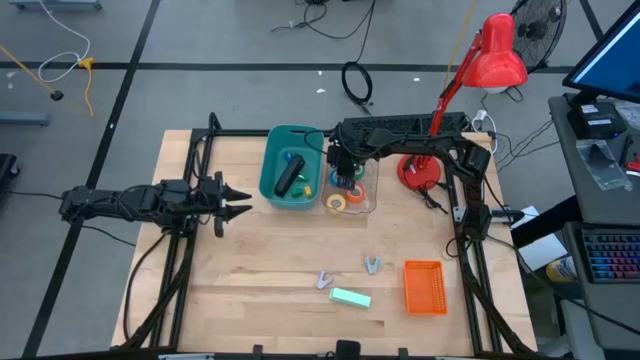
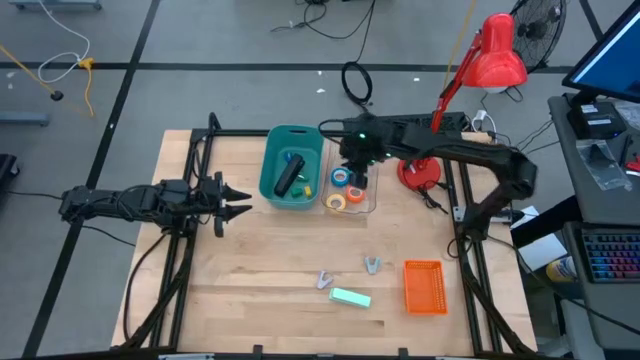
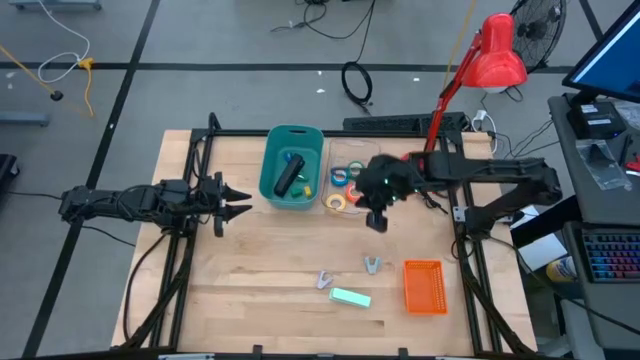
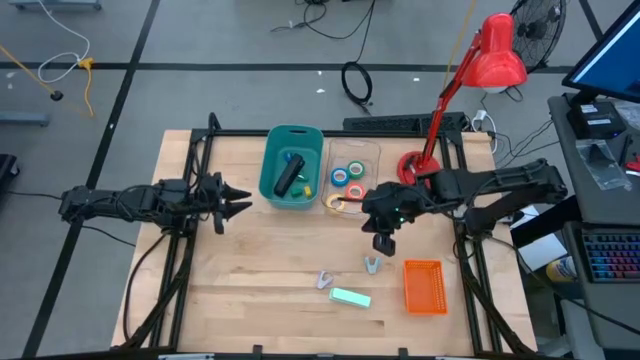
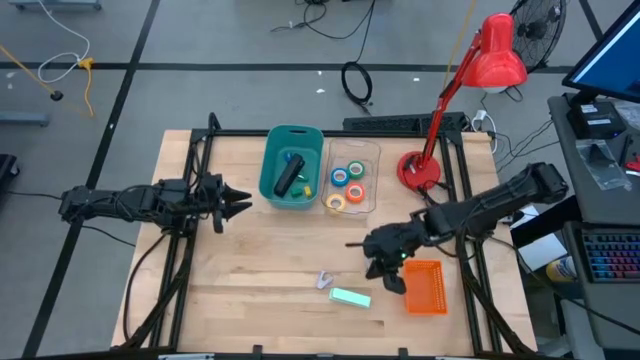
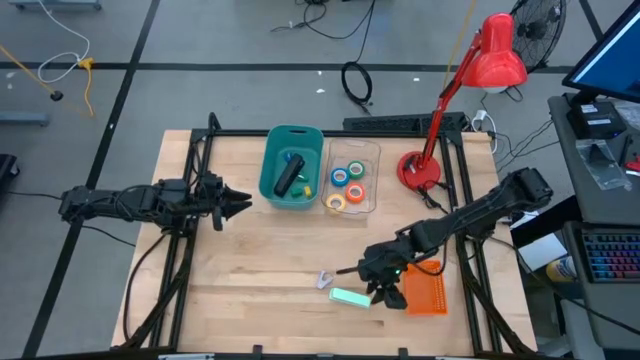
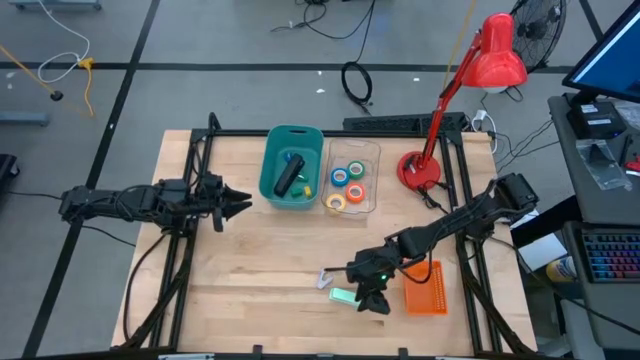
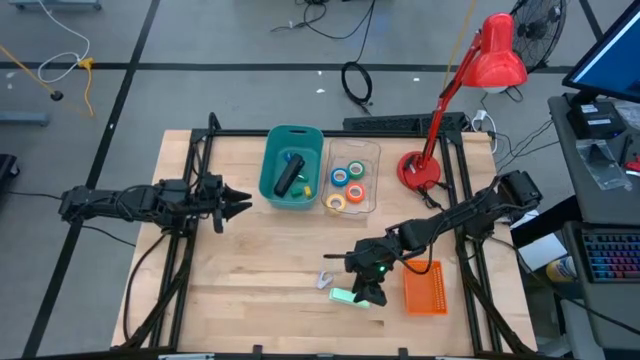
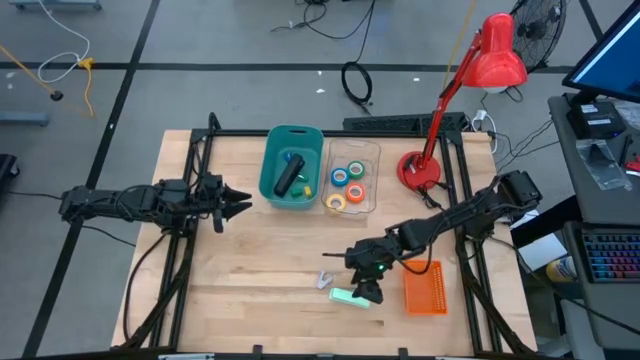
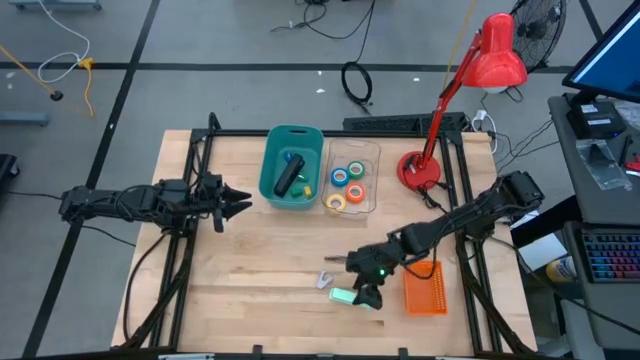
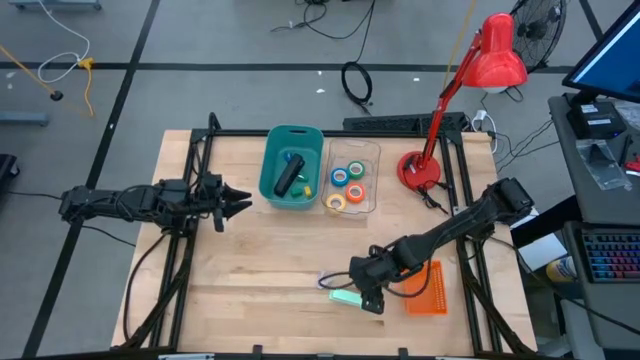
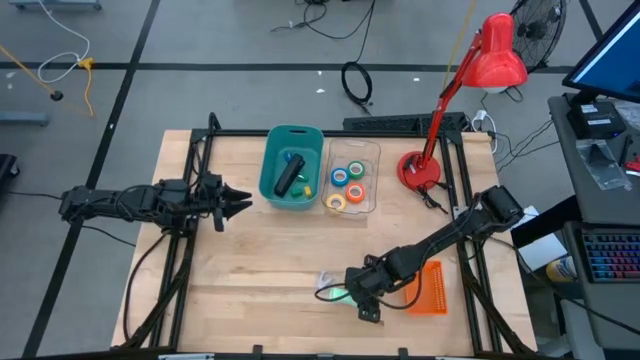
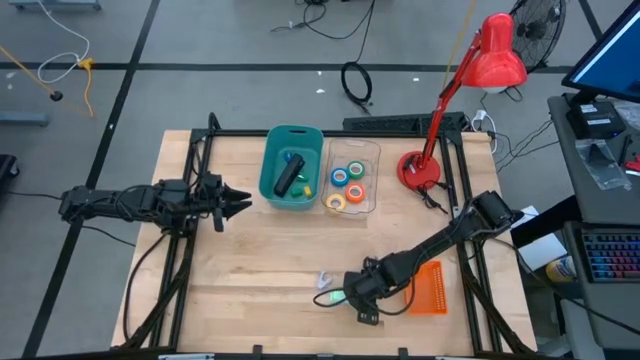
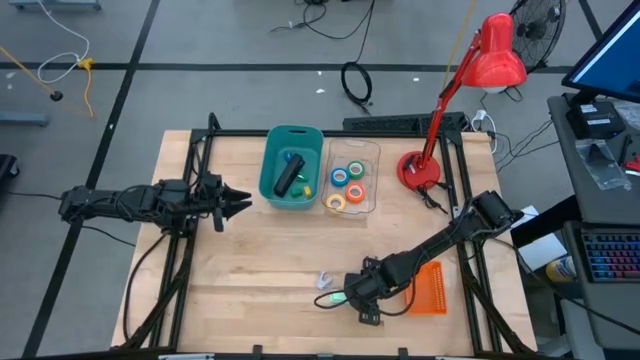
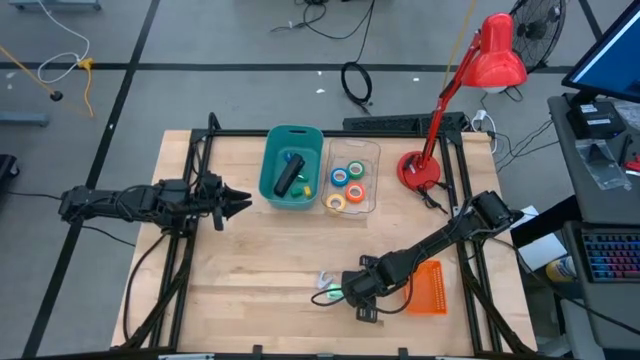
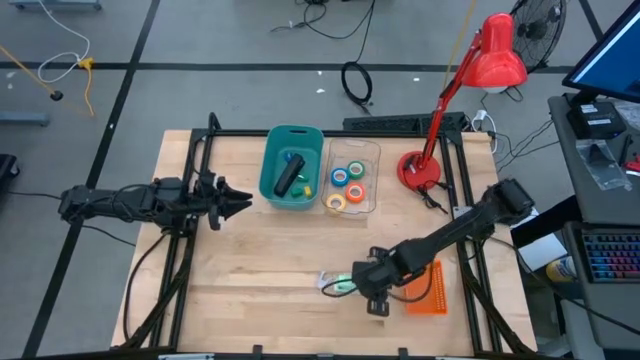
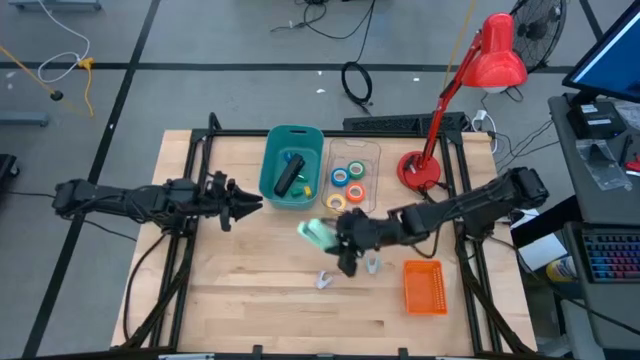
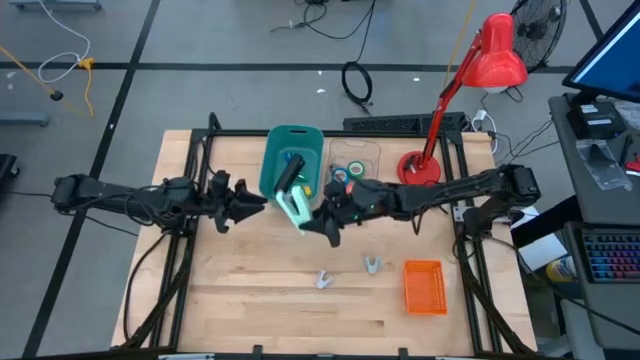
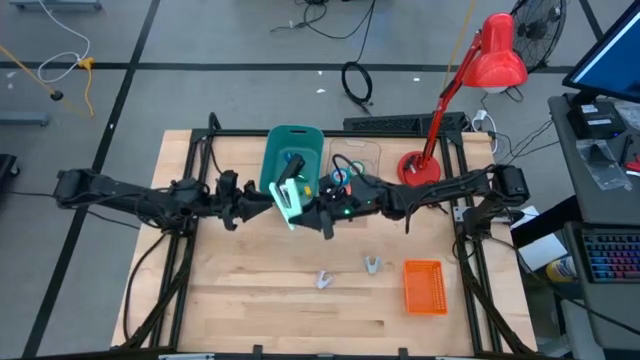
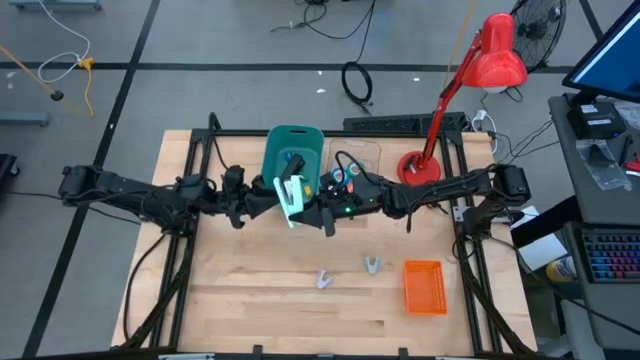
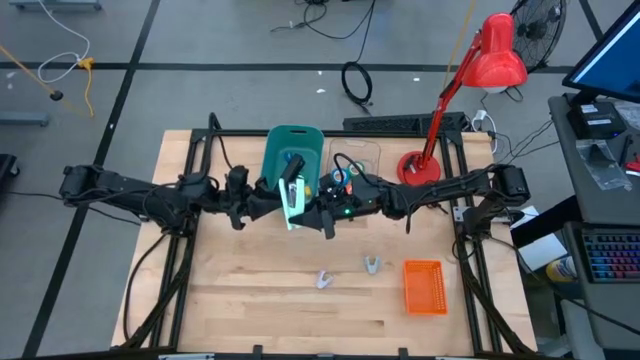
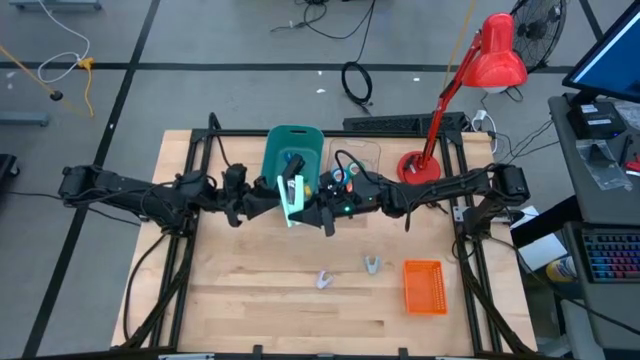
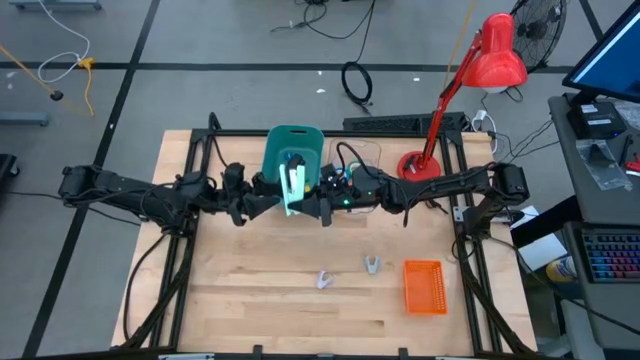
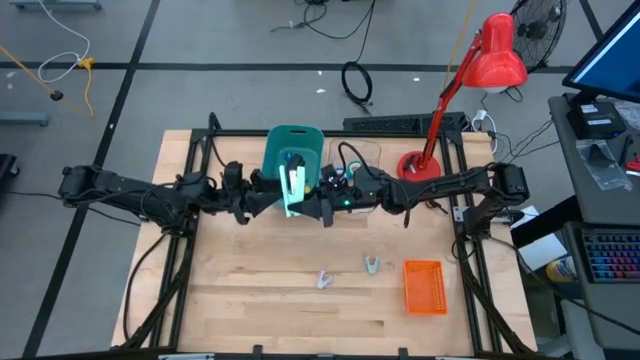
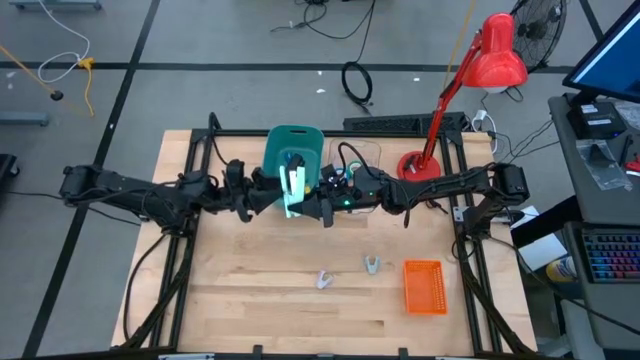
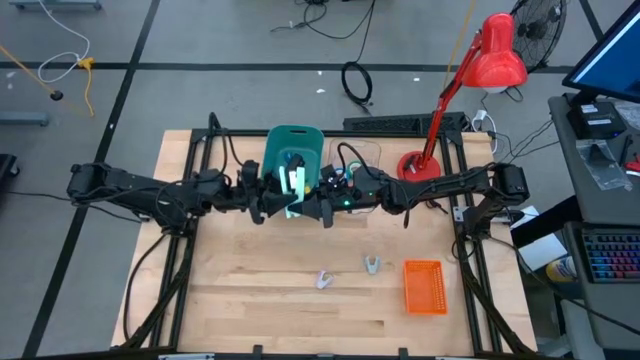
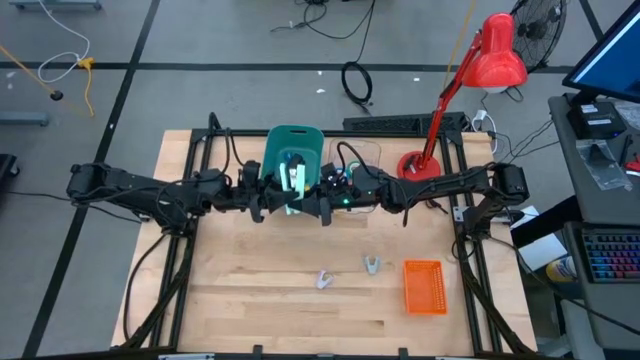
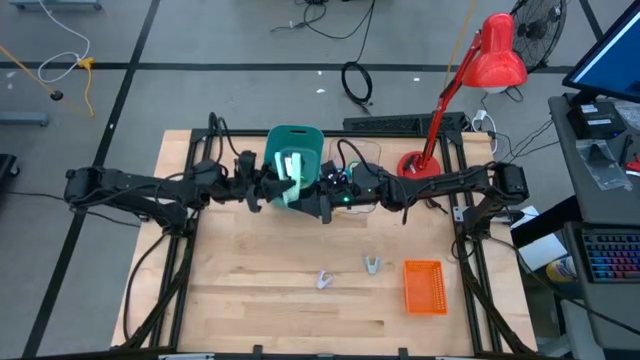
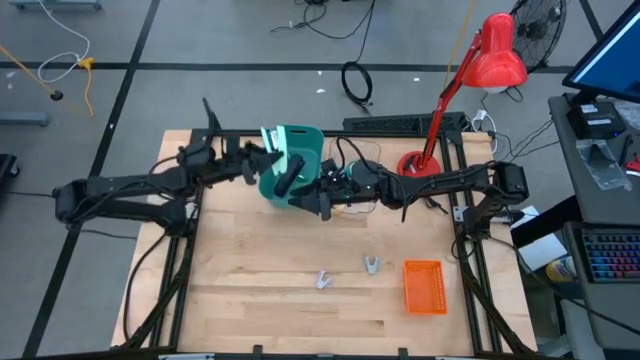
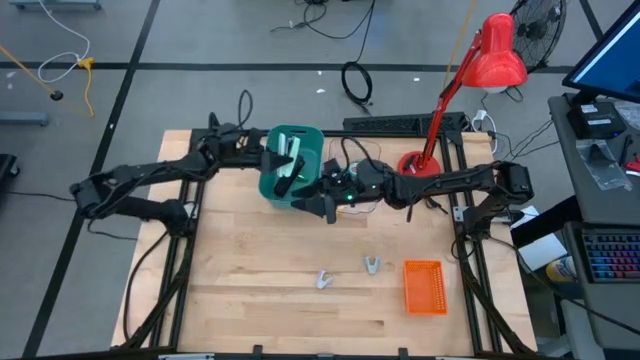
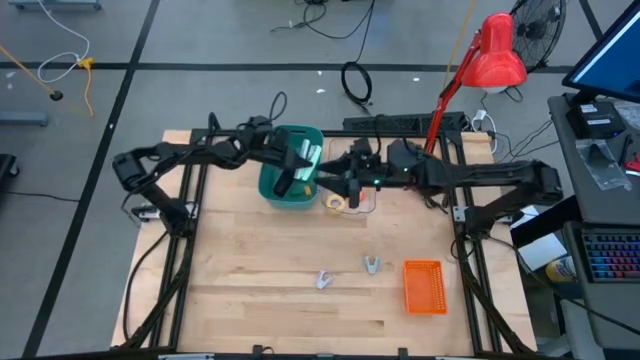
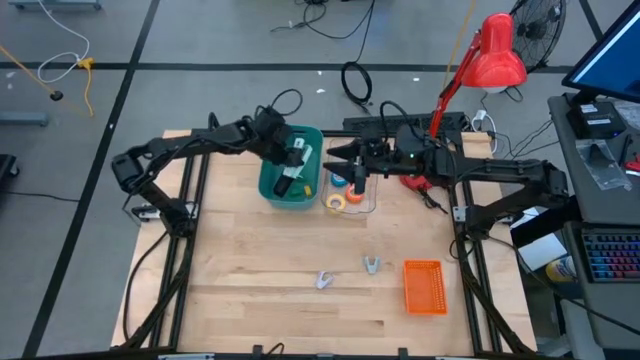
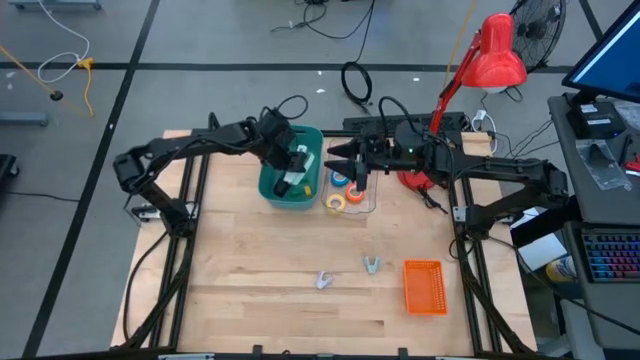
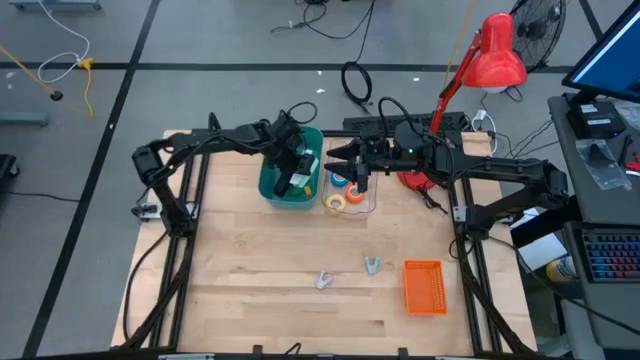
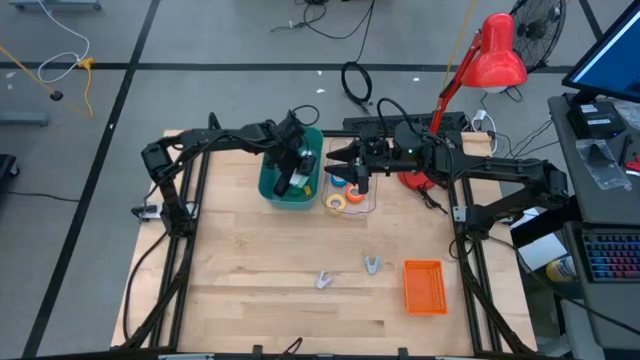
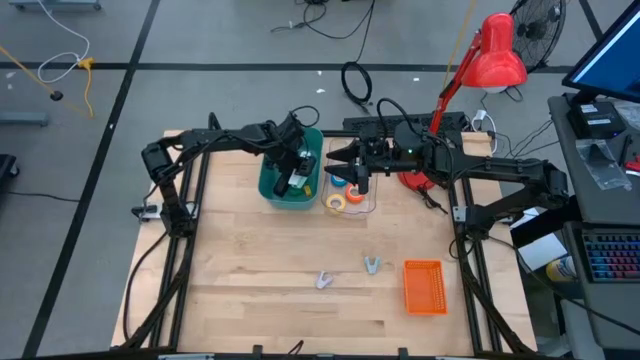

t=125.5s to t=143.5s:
Task: Pick and place Stapler, Stapler remover, tape
Put the large light green stapler into the green bin
